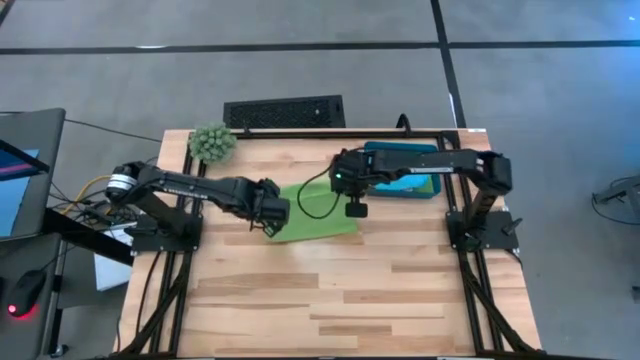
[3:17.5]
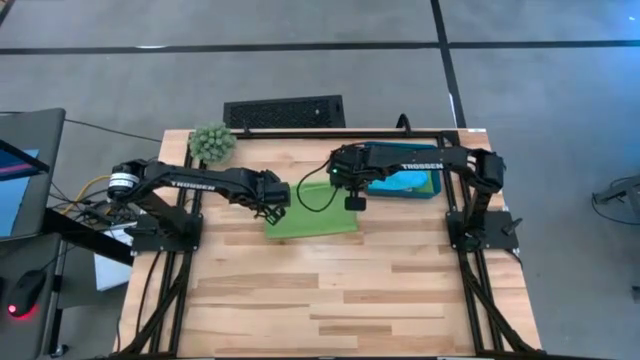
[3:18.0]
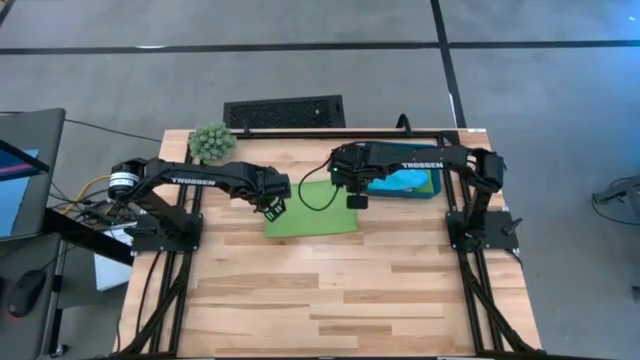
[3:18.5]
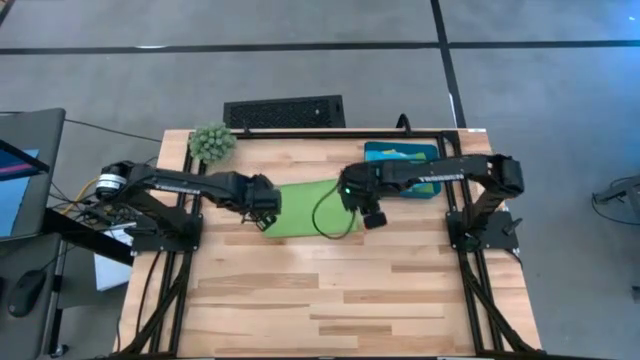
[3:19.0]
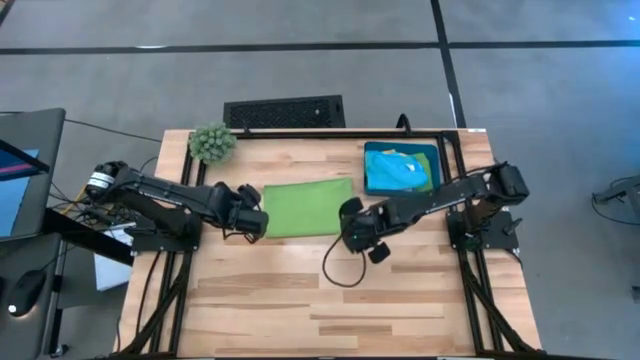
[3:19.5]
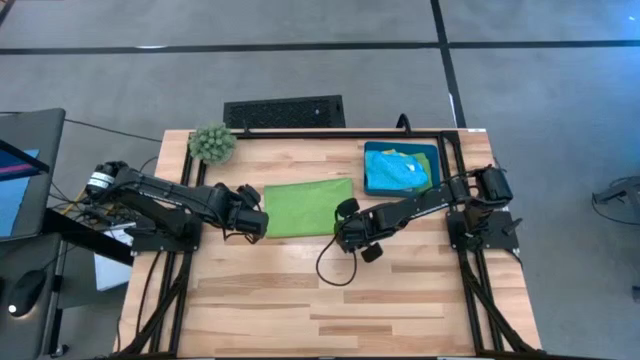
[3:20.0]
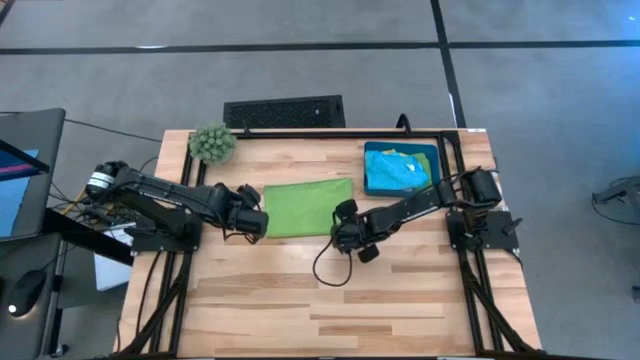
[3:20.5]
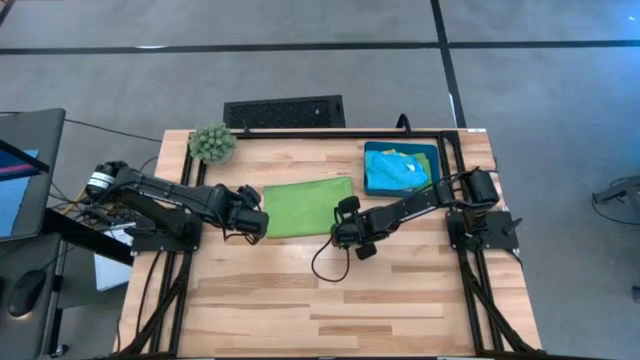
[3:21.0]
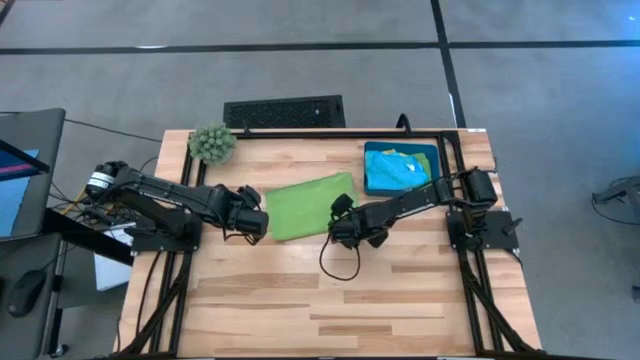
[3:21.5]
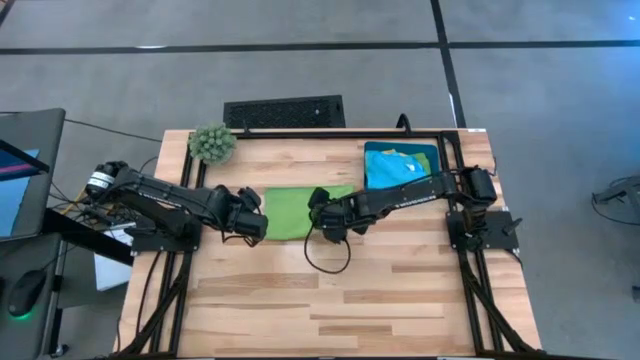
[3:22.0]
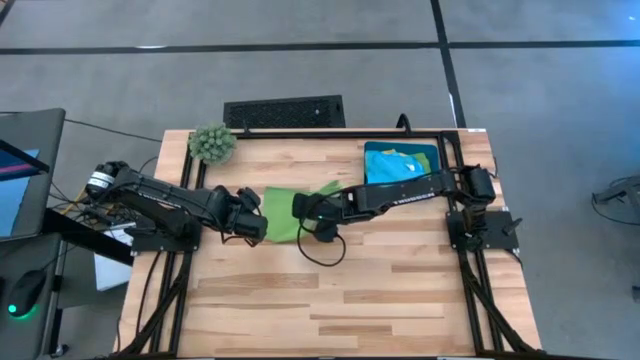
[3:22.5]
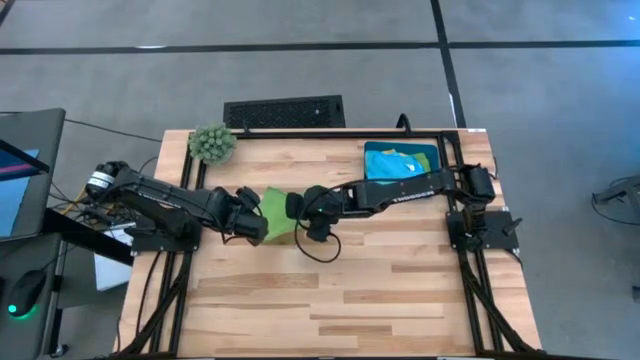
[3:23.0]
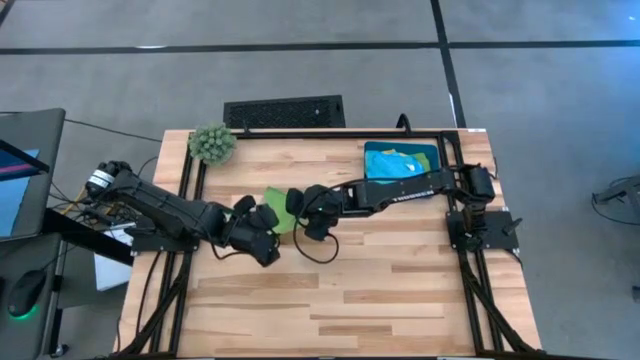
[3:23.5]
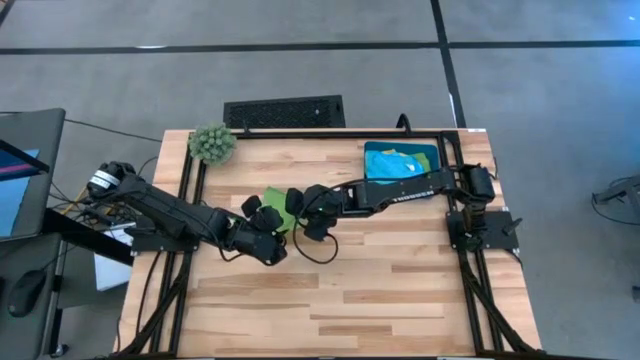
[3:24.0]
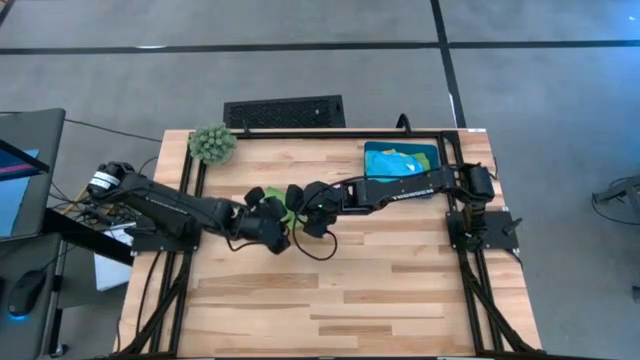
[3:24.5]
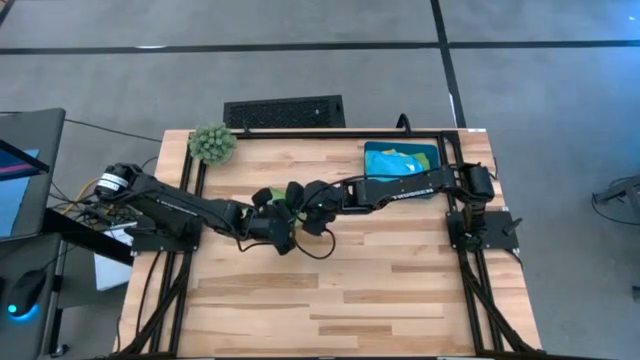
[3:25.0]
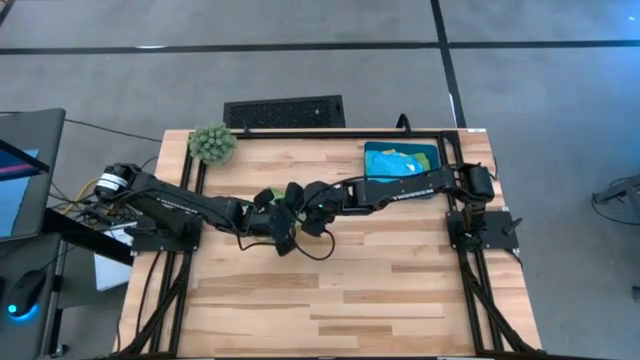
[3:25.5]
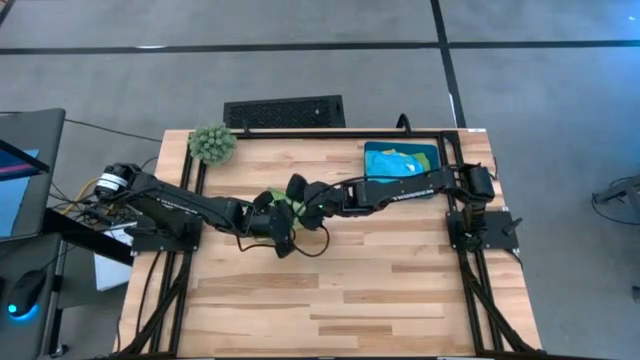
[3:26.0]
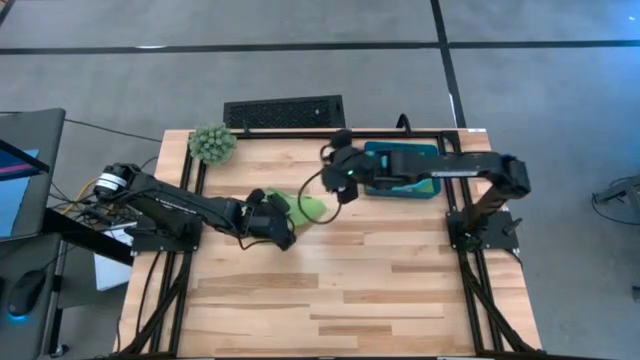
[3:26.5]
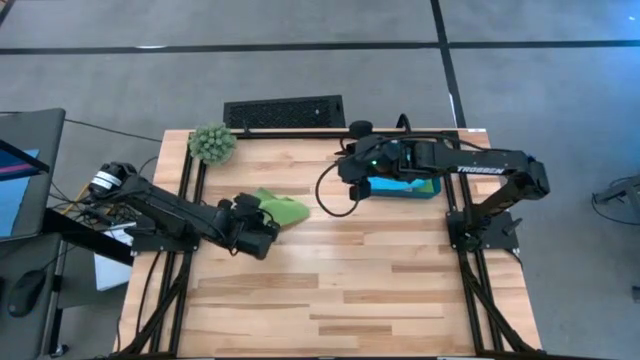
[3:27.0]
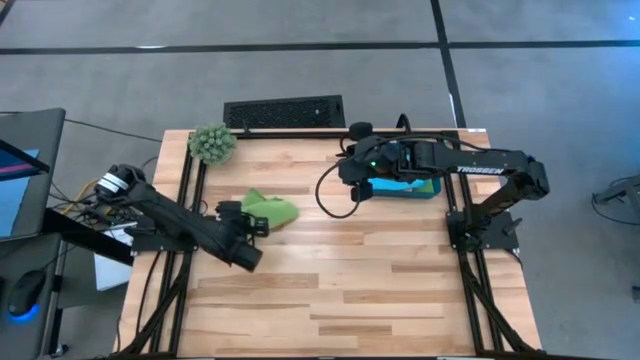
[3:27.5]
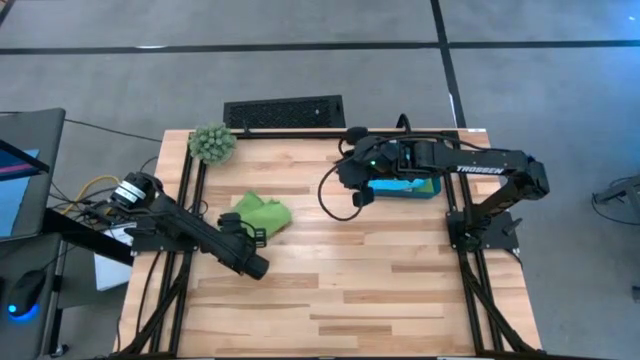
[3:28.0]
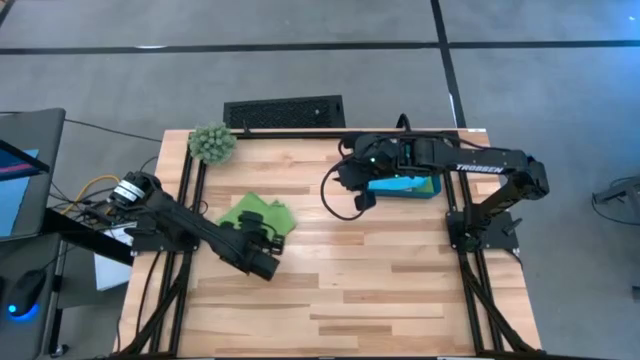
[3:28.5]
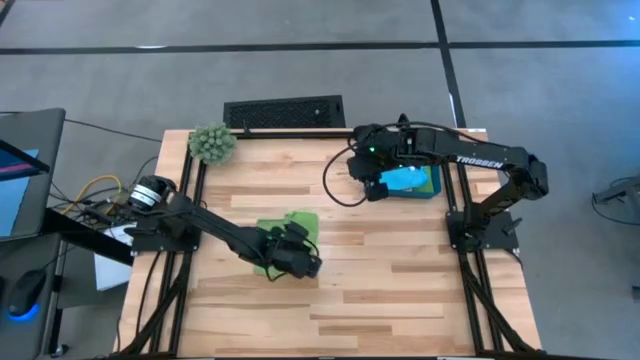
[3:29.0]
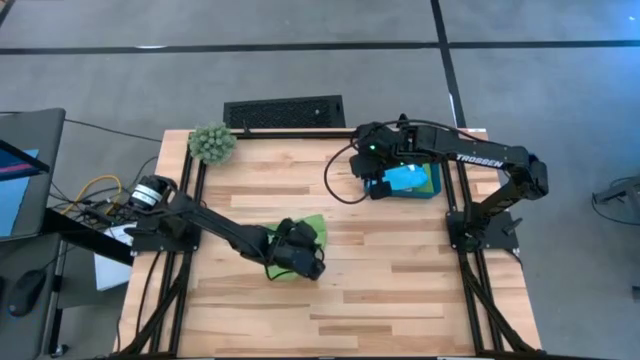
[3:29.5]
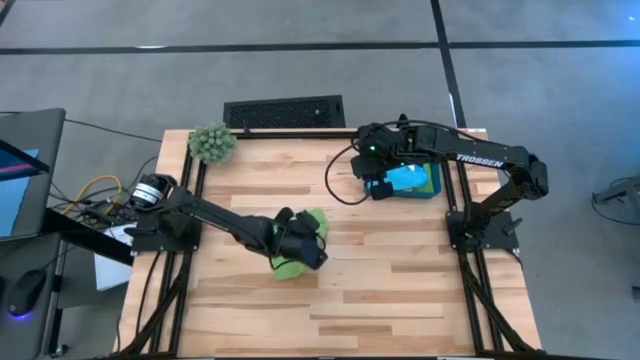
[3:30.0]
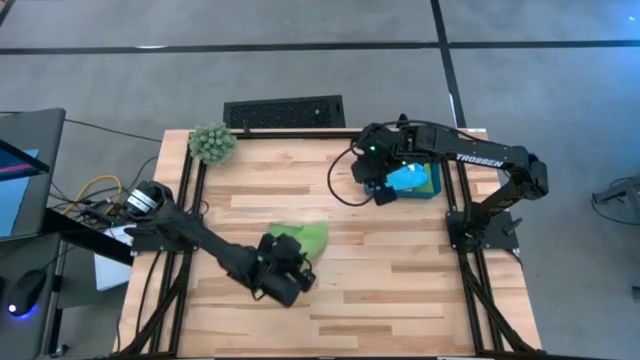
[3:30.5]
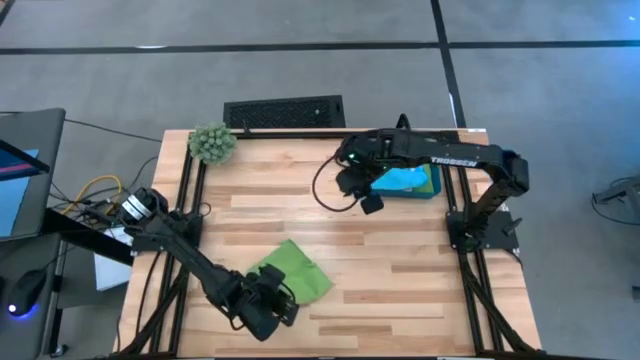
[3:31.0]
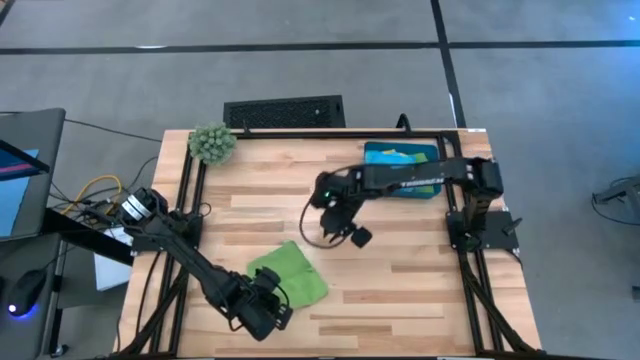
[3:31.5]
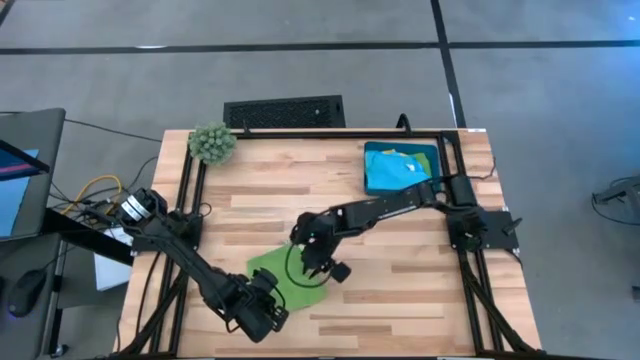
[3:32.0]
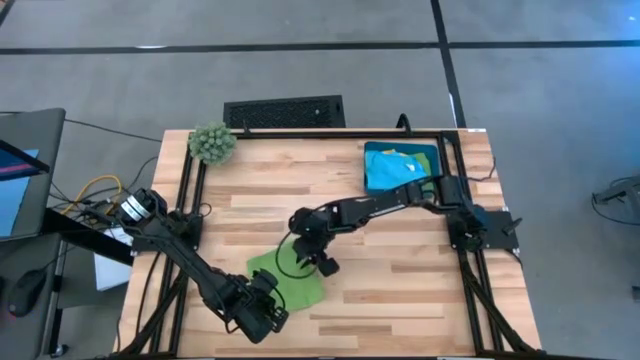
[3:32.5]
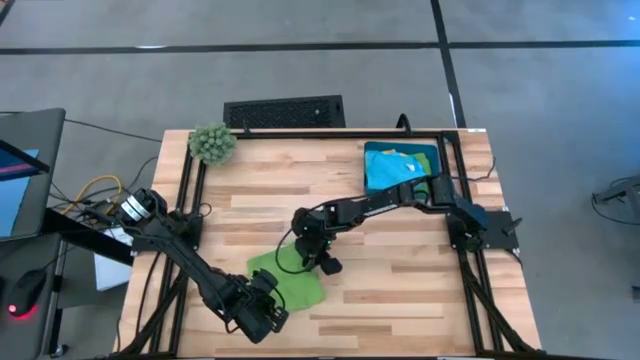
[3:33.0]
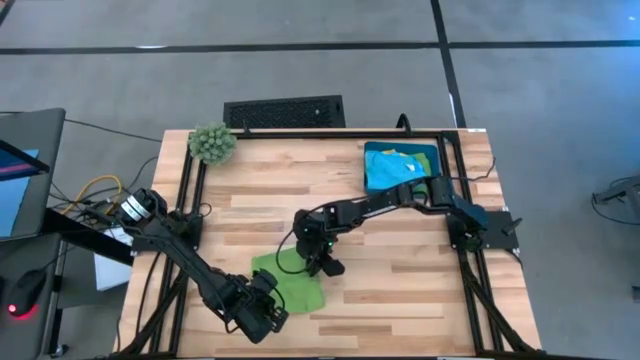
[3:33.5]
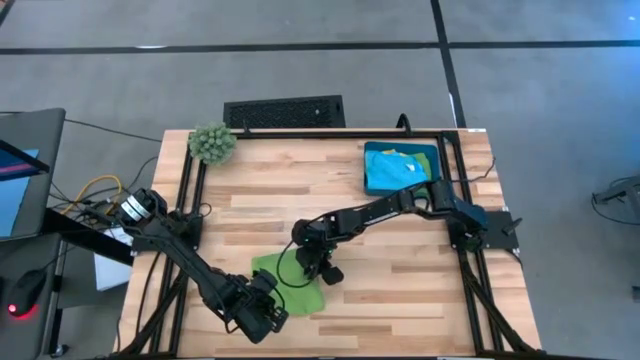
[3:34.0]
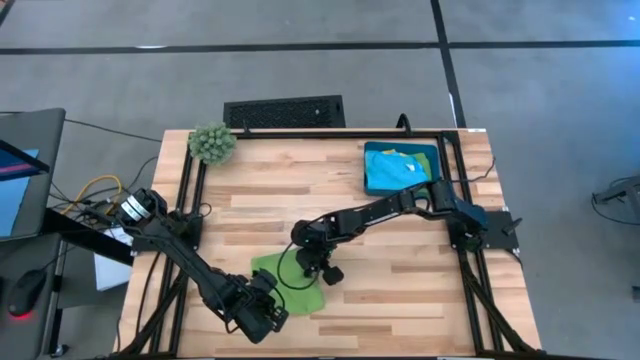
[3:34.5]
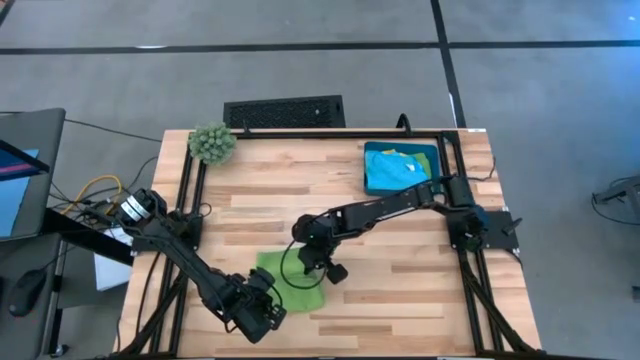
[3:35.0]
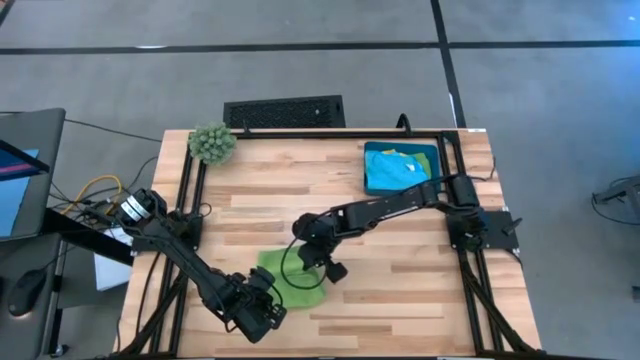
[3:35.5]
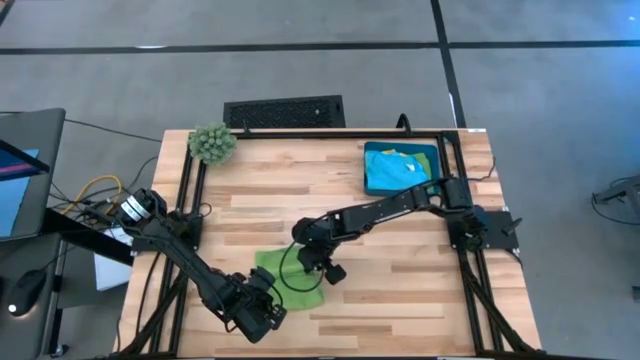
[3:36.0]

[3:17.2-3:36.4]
Task: Fold microfiber towels
Fold the green microfiber cloth

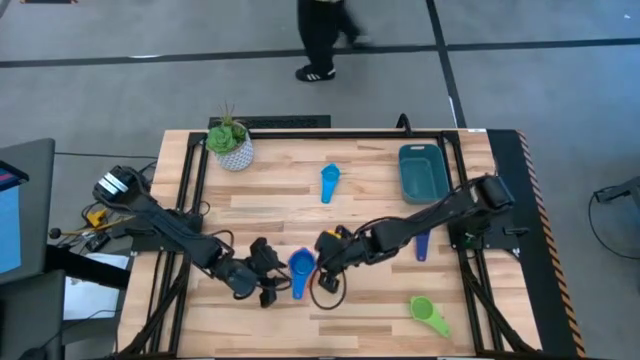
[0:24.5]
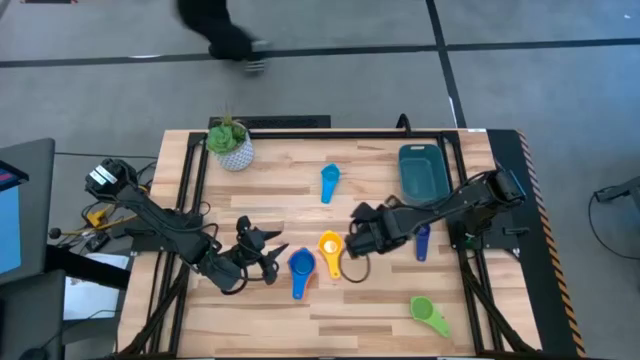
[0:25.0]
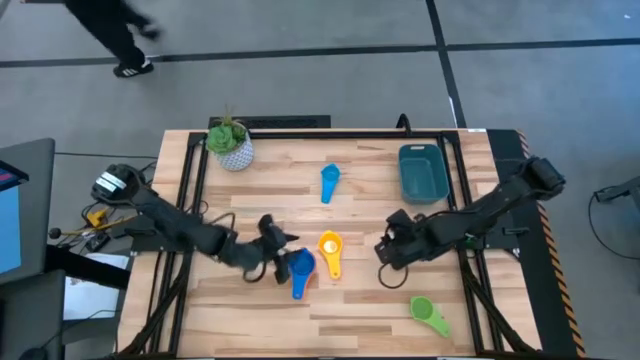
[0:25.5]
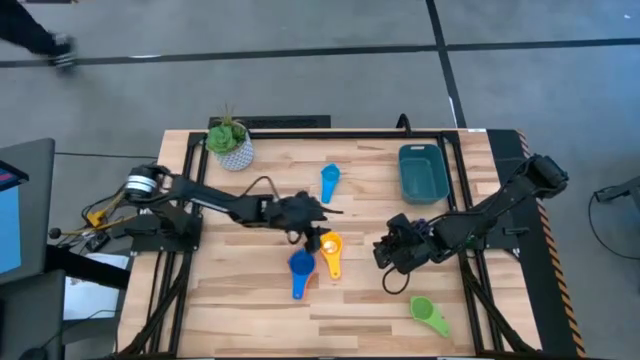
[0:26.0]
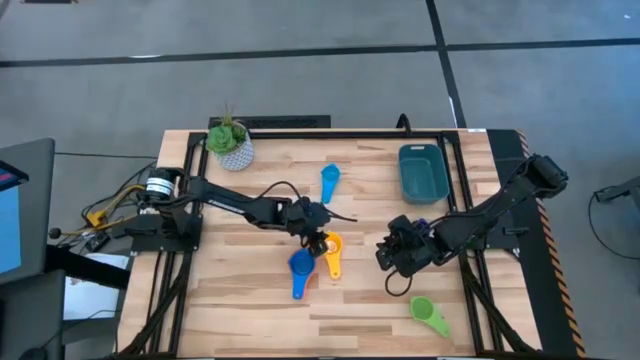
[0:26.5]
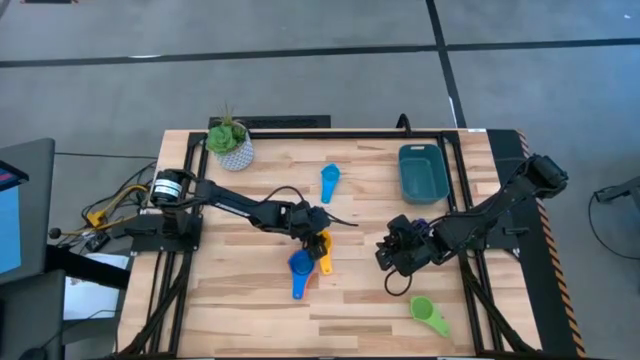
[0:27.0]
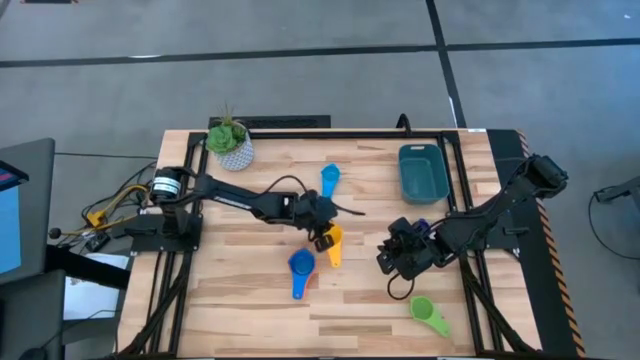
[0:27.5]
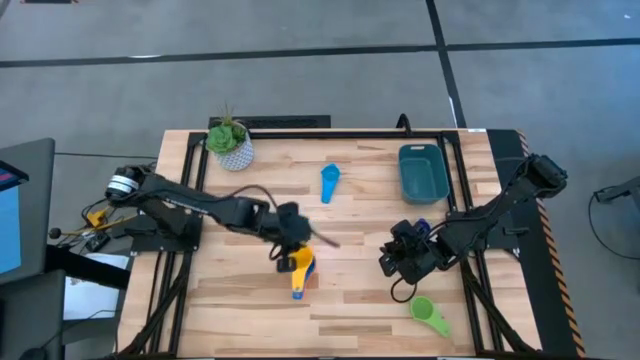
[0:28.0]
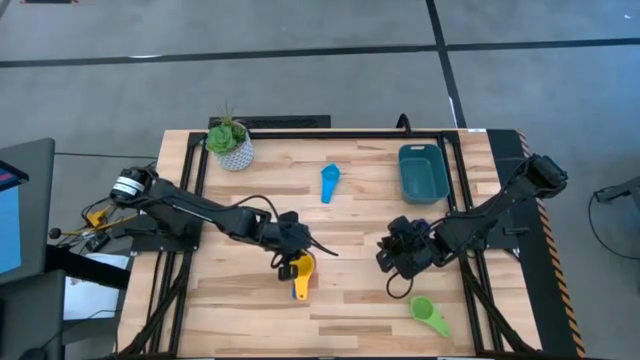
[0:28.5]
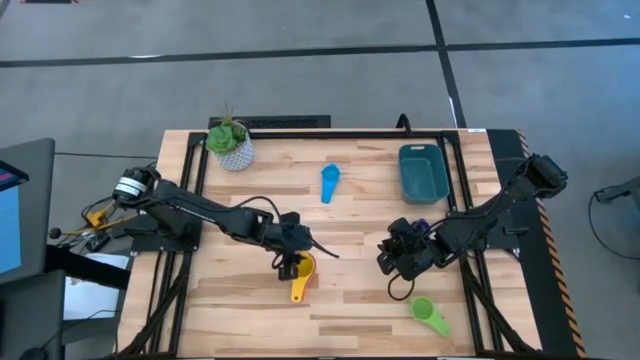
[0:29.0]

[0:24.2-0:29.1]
Task: Nest measuring cups in basket
Stack the yellow measuring cup into the blue measuring cup
